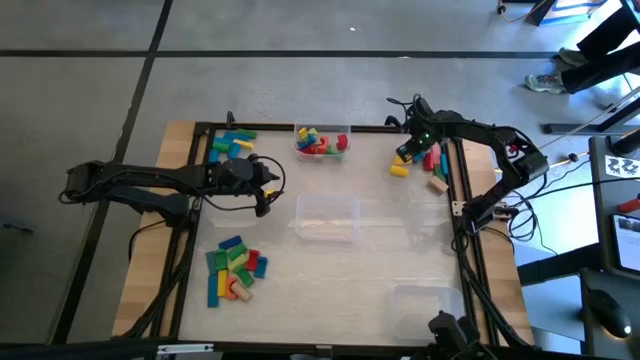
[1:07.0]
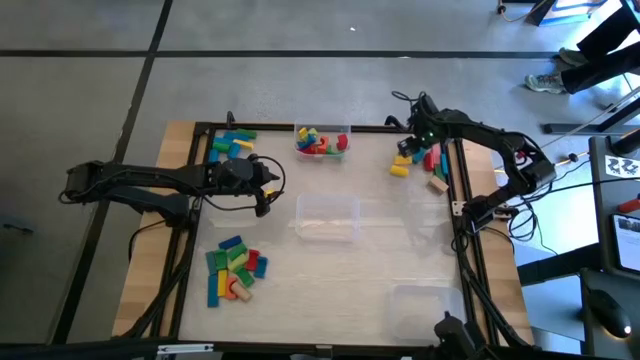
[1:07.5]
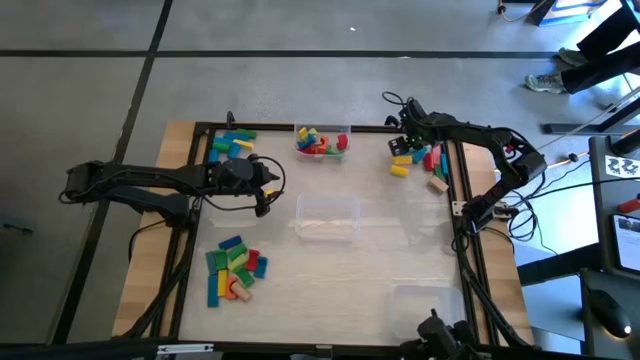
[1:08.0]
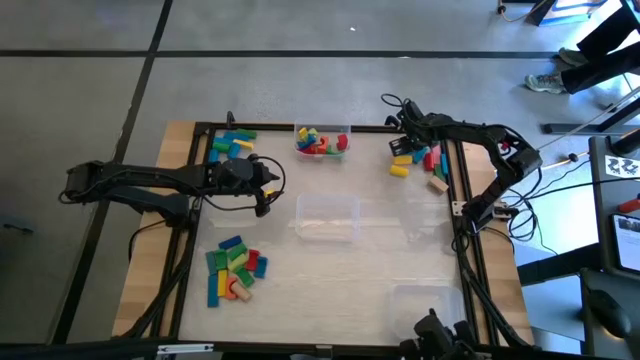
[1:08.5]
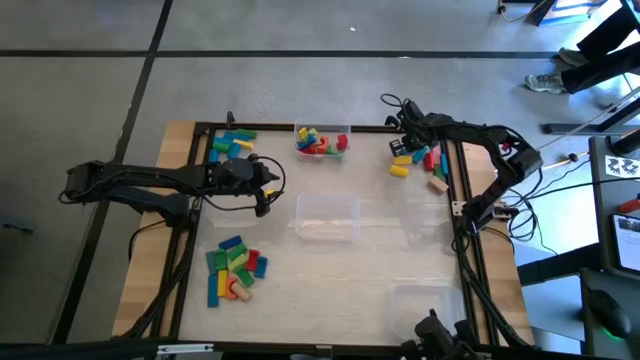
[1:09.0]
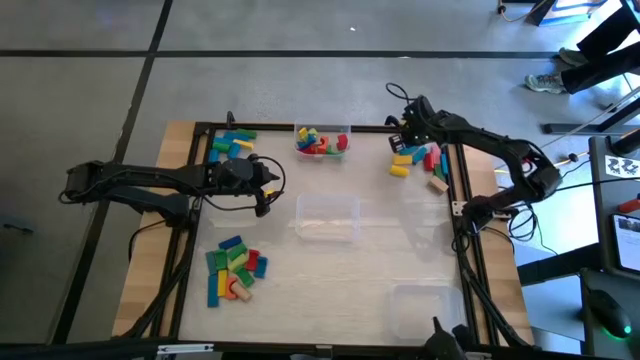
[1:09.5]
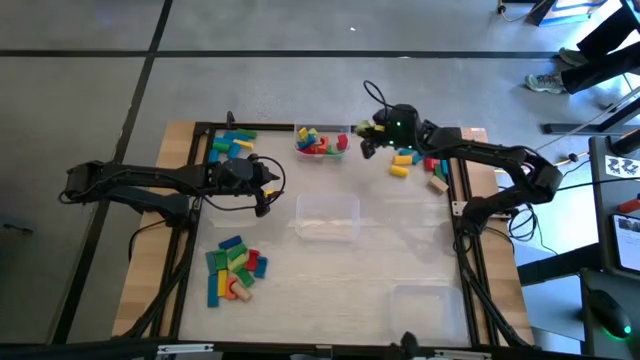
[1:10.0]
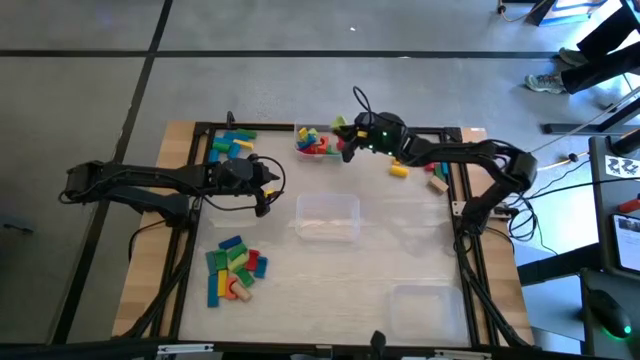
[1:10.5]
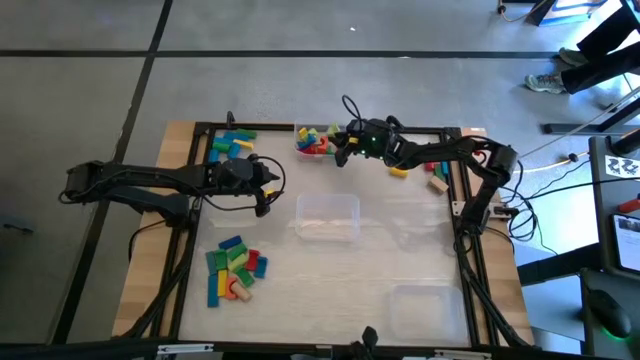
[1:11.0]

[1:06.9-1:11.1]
Task: Sort blocks by size
Put the light green arch block into the top transparent bin

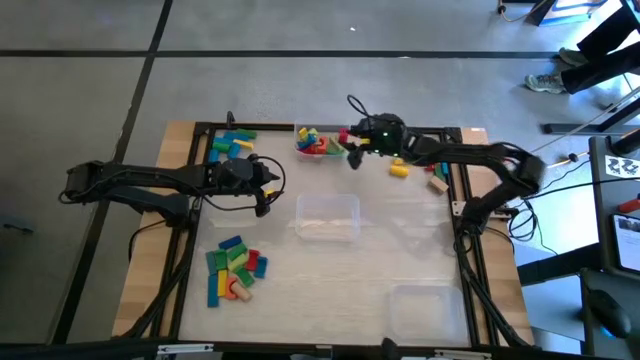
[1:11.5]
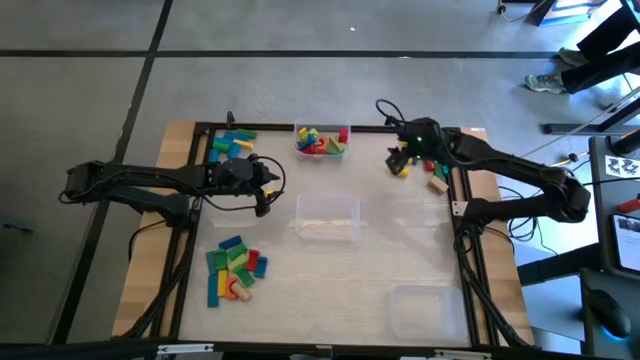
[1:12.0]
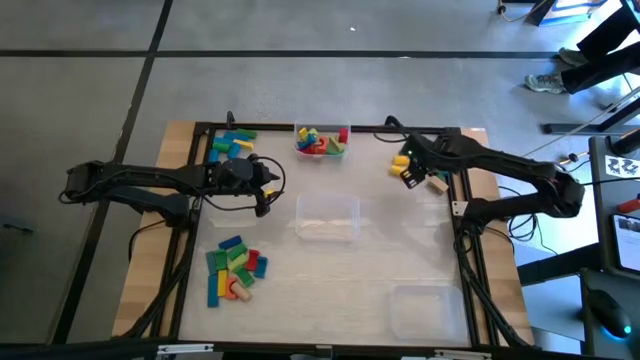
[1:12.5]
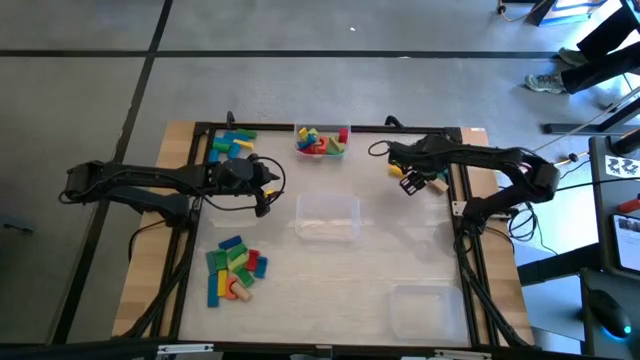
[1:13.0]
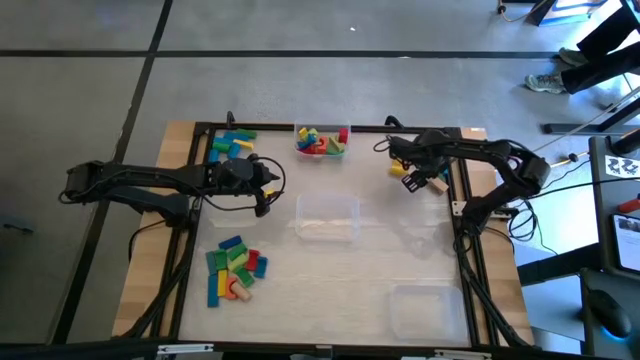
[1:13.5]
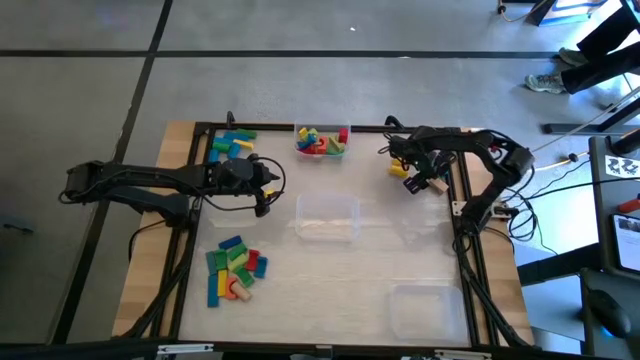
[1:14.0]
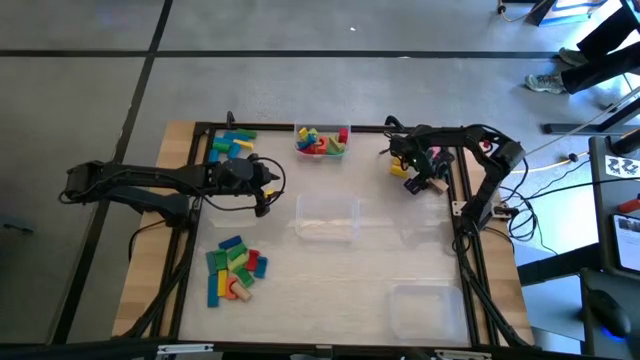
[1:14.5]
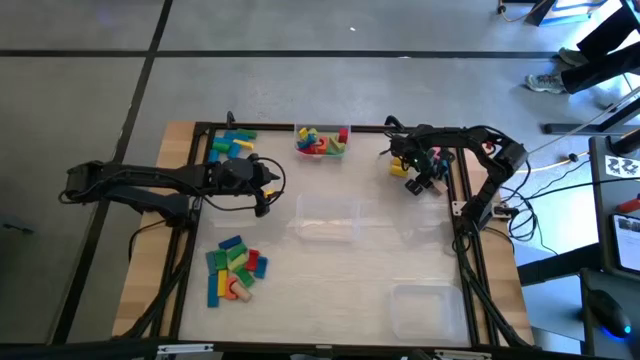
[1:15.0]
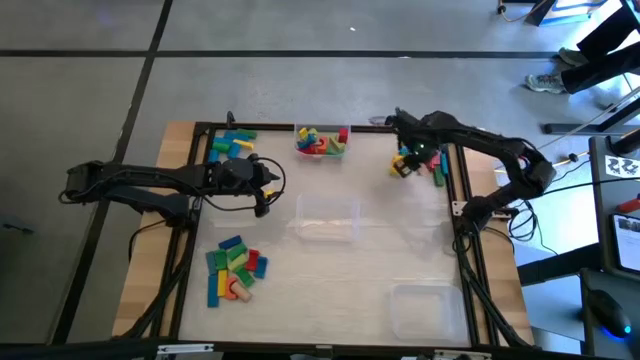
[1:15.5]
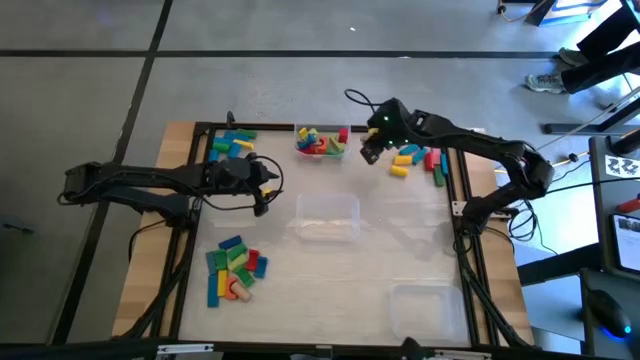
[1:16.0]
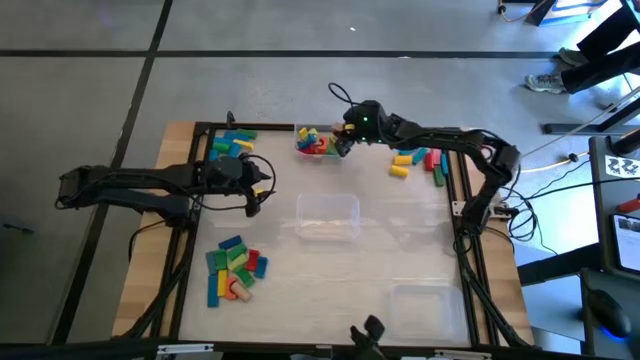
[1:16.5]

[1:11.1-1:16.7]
Put the brown arch block into the top transparent bin

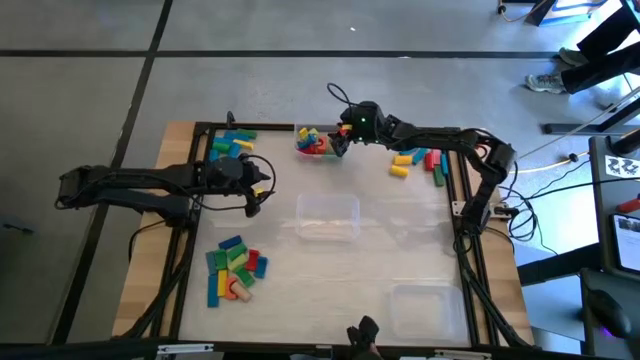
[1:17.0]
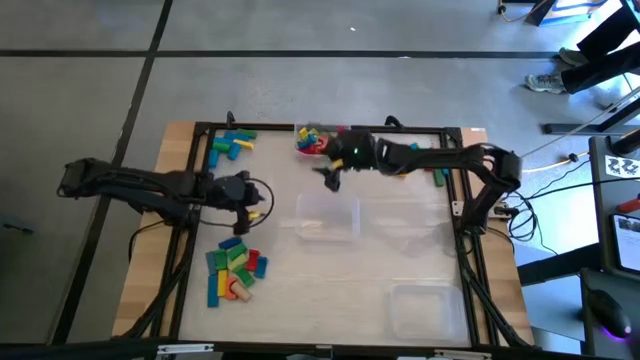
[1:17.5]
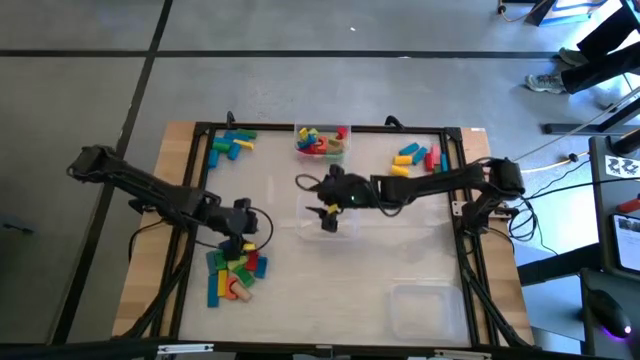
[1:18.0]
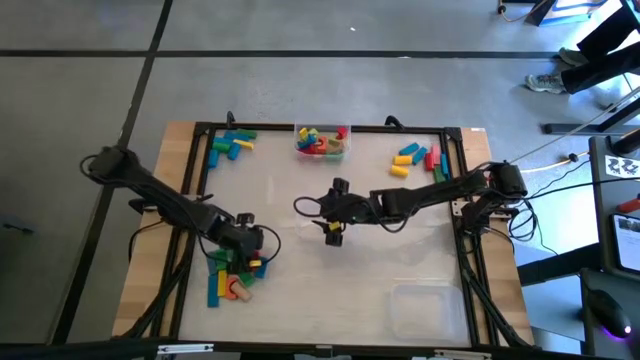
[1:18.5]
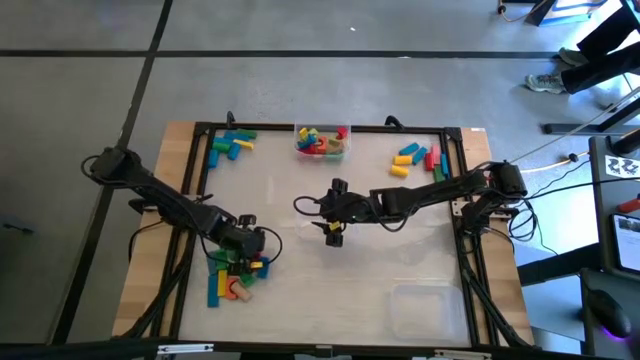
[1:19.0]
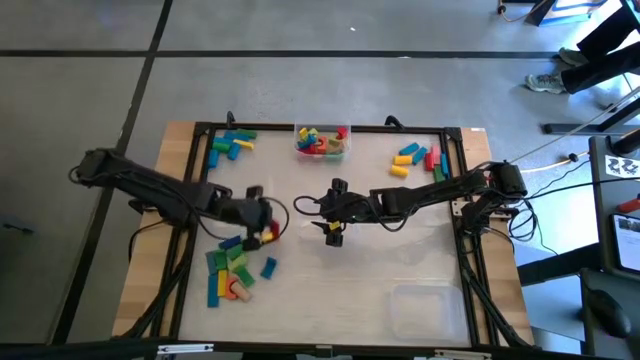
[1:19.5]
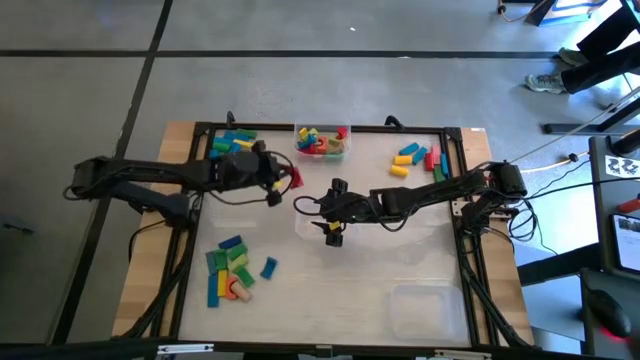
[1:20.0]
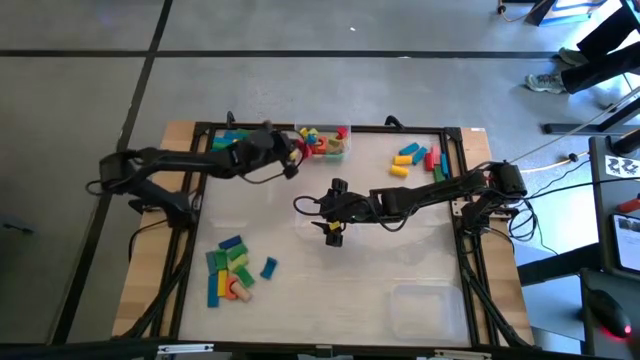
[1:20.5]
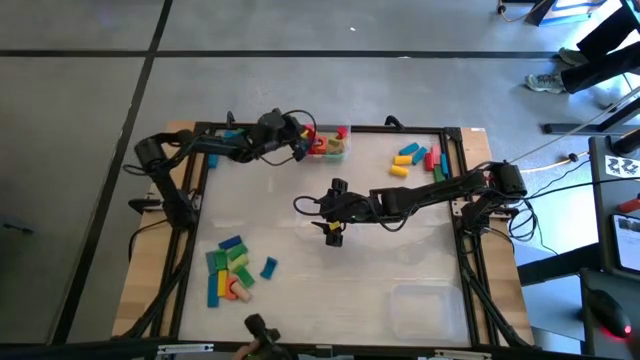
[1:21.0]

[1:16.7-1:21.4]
Put the red arch block into the top transparent bin

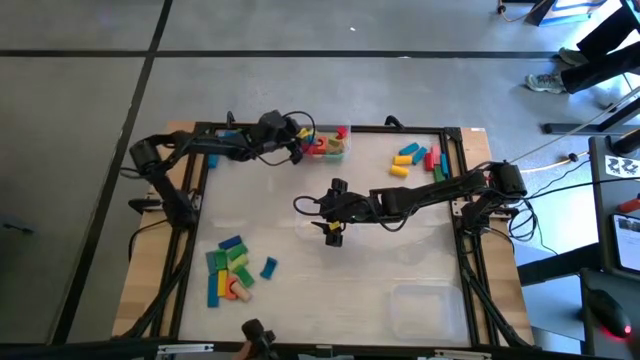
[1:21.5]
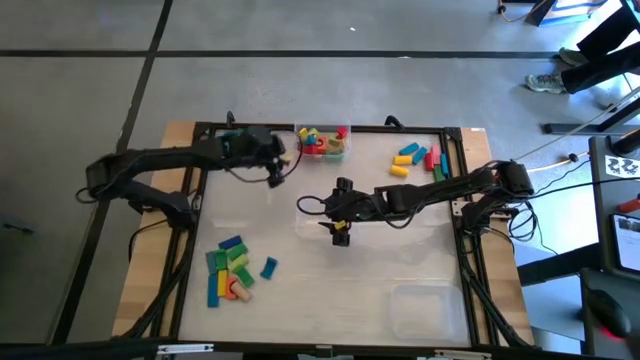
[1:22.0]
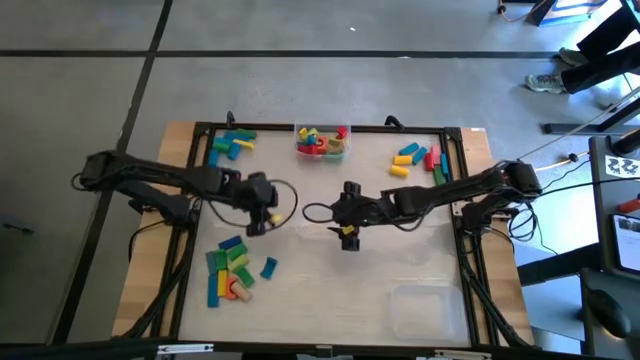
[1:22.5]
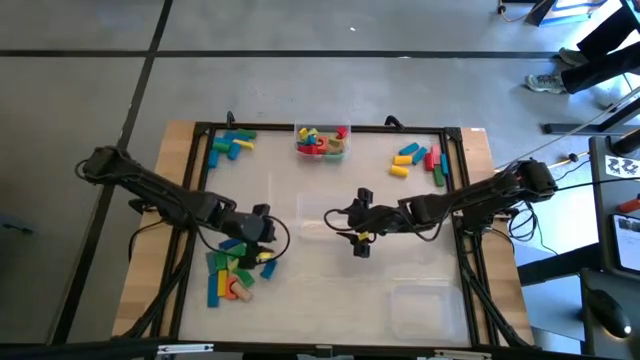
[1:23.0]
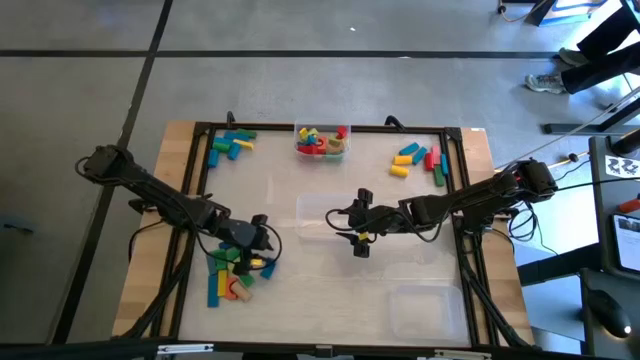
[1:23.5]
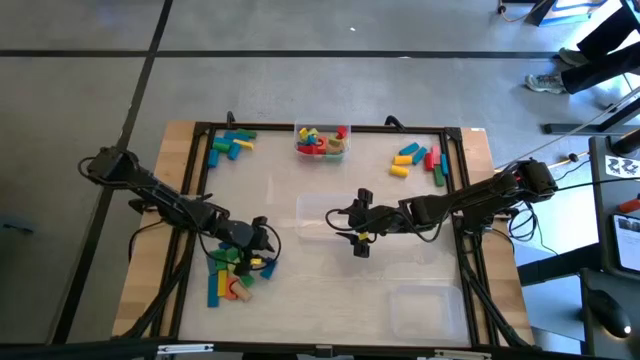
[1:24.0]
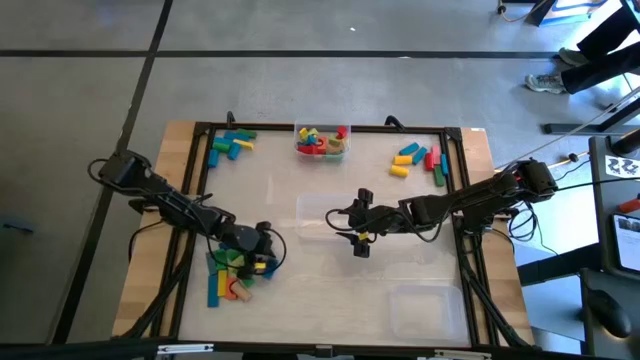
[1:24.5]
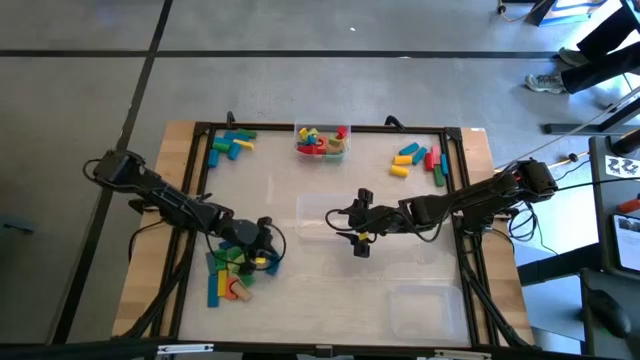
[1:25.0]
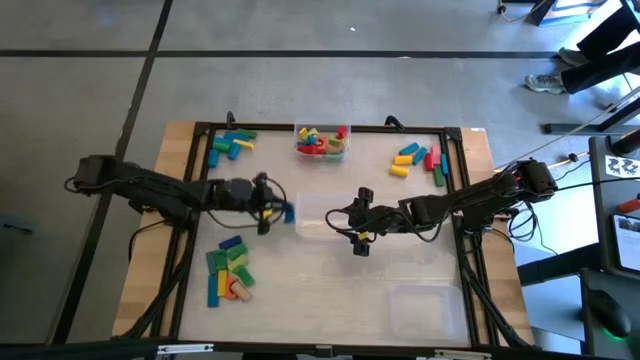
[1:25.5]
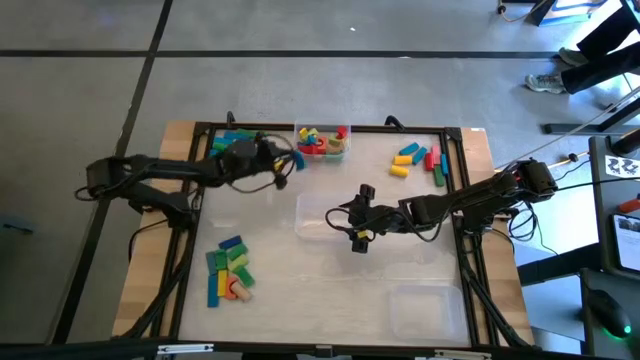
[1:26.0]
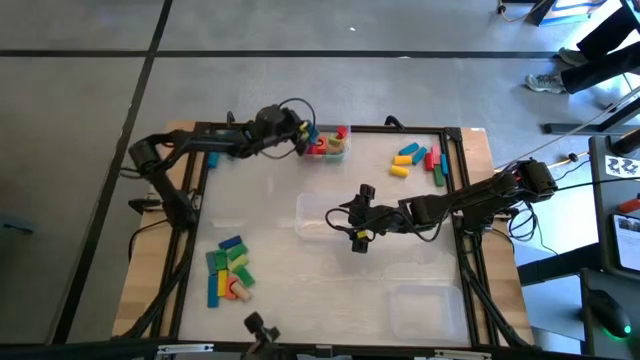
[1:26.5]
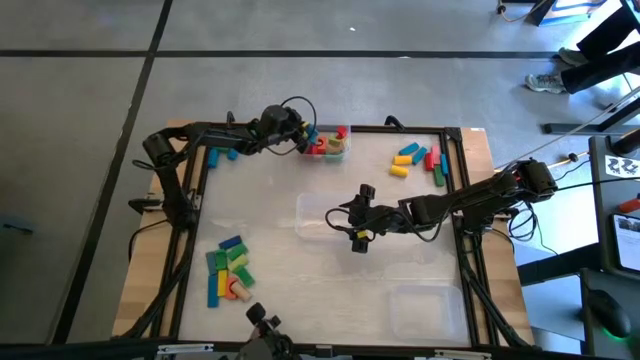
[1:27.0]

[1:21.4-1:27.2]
Put the blue arch block into the top transparent bin
